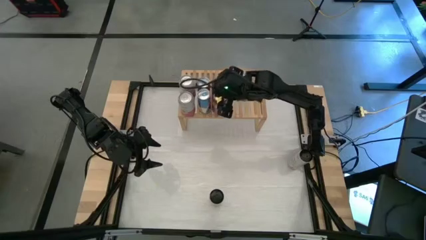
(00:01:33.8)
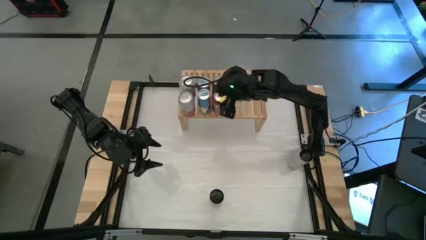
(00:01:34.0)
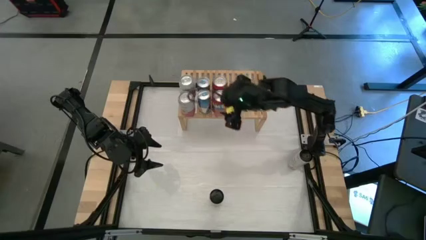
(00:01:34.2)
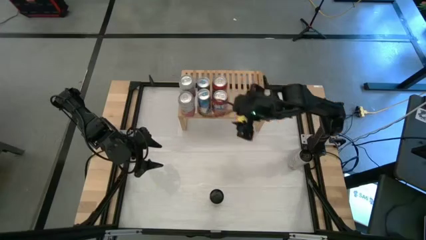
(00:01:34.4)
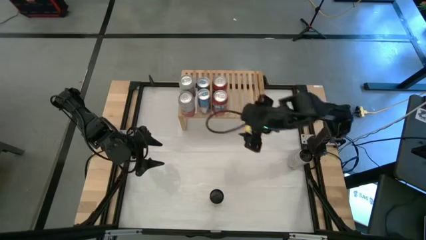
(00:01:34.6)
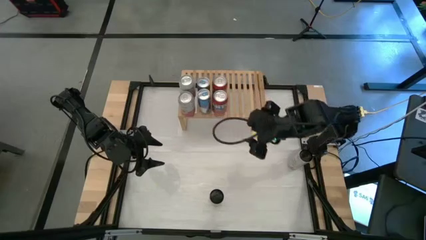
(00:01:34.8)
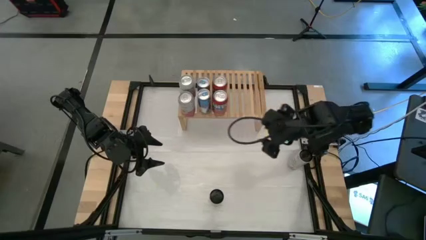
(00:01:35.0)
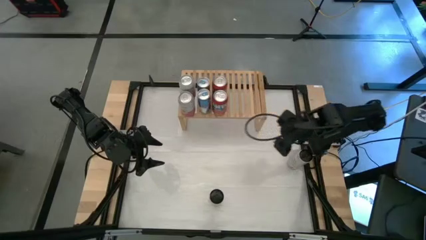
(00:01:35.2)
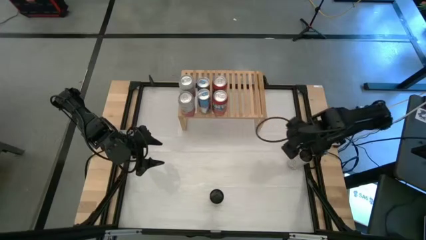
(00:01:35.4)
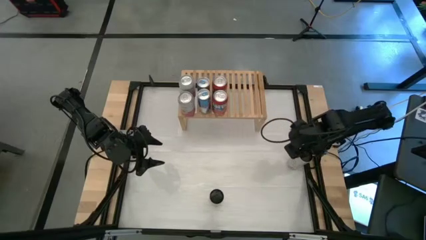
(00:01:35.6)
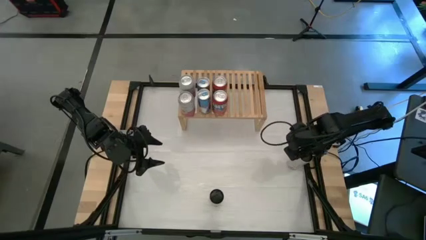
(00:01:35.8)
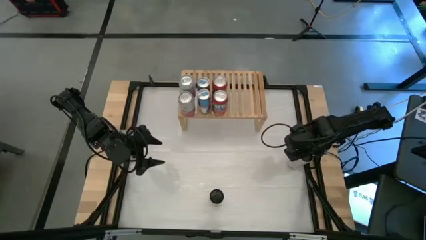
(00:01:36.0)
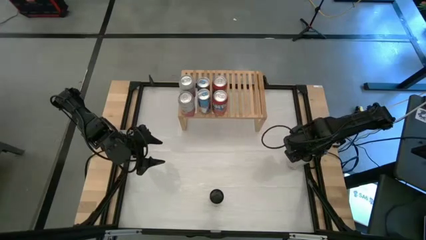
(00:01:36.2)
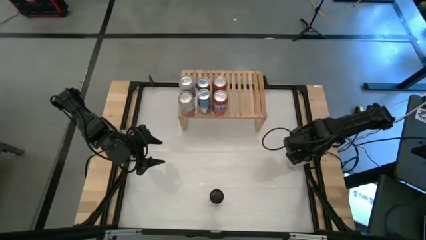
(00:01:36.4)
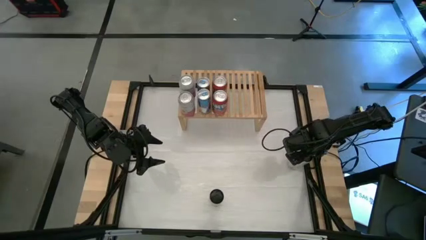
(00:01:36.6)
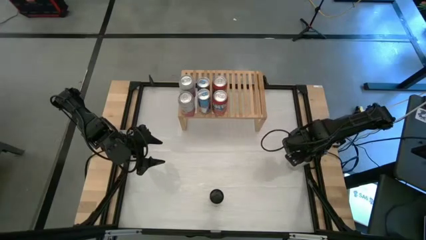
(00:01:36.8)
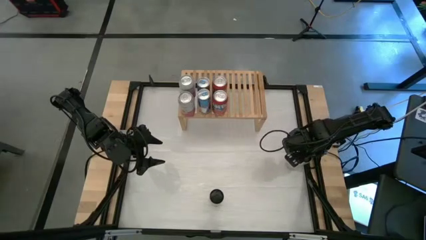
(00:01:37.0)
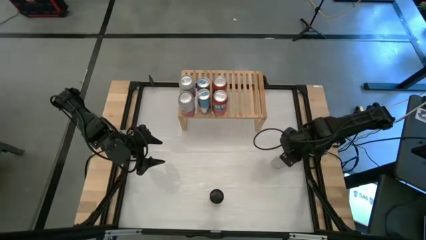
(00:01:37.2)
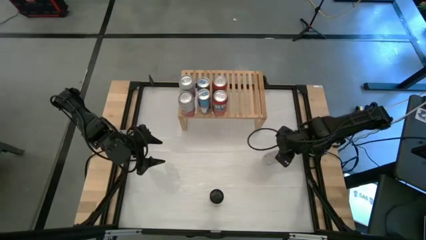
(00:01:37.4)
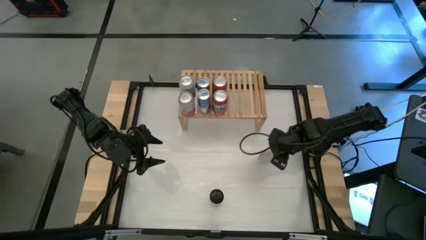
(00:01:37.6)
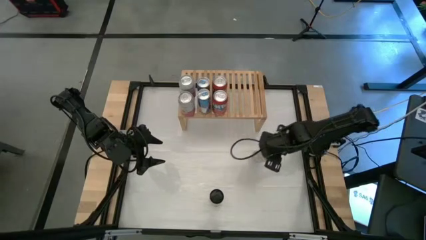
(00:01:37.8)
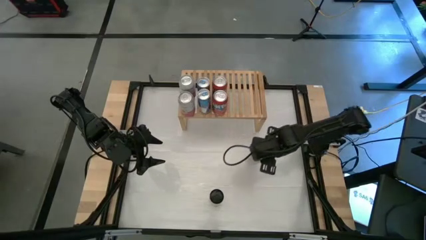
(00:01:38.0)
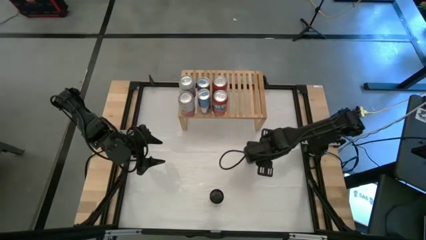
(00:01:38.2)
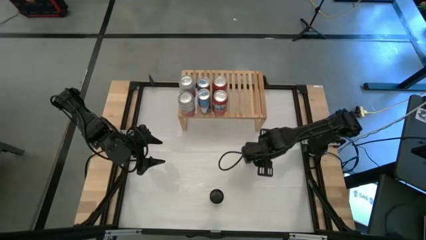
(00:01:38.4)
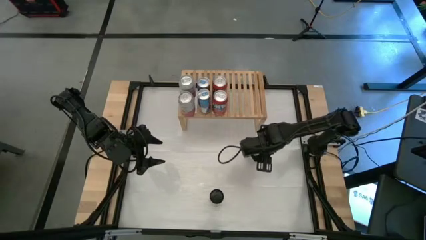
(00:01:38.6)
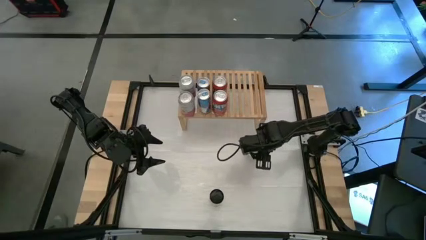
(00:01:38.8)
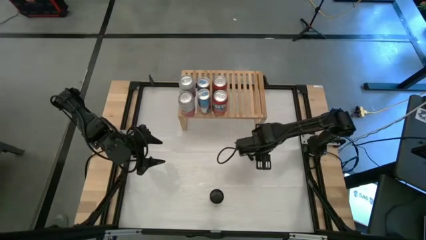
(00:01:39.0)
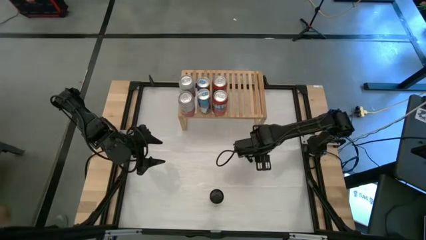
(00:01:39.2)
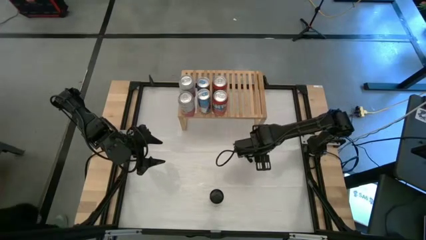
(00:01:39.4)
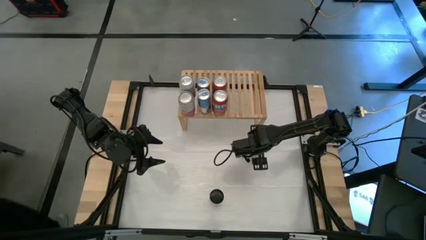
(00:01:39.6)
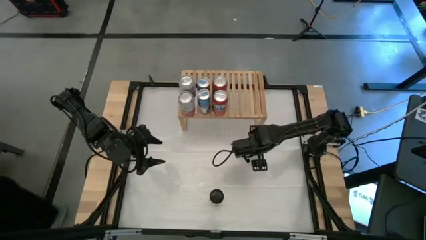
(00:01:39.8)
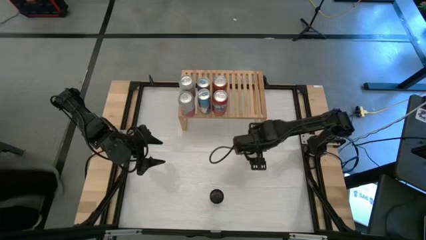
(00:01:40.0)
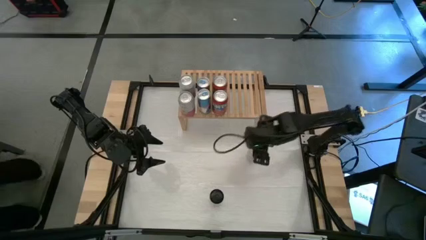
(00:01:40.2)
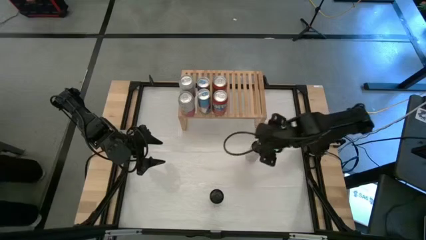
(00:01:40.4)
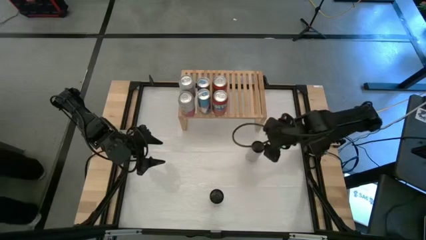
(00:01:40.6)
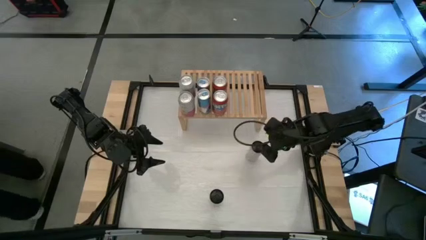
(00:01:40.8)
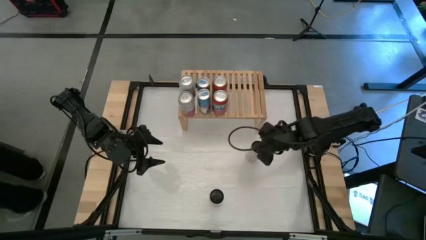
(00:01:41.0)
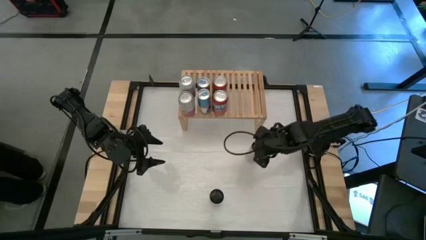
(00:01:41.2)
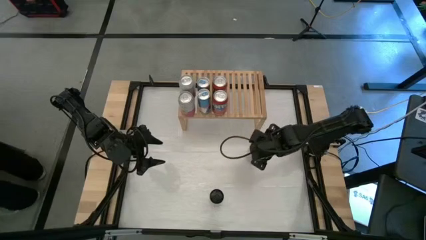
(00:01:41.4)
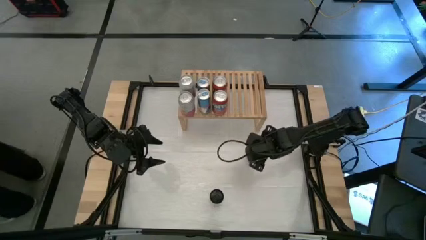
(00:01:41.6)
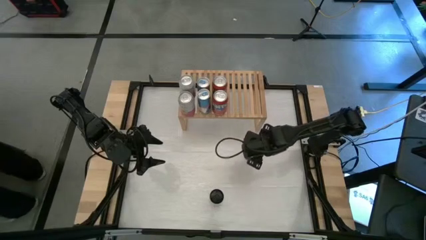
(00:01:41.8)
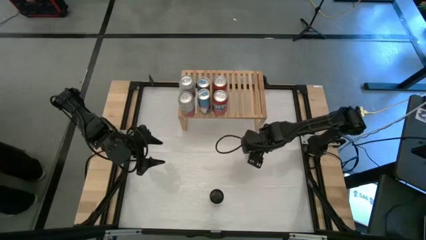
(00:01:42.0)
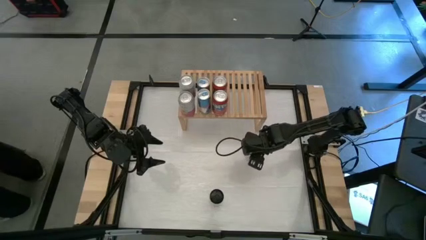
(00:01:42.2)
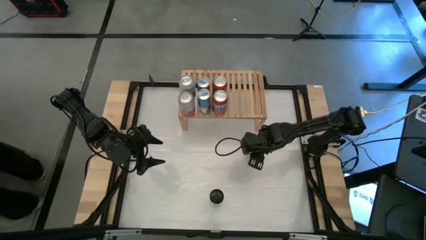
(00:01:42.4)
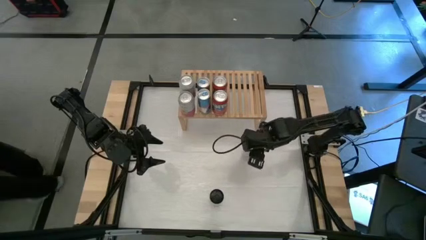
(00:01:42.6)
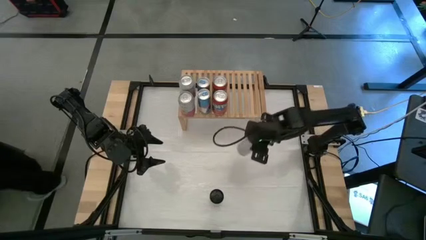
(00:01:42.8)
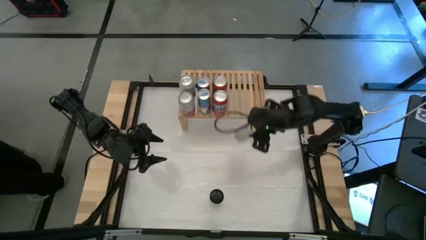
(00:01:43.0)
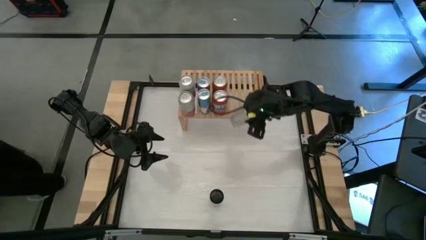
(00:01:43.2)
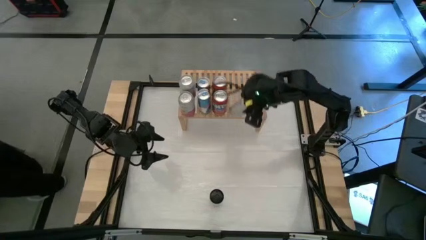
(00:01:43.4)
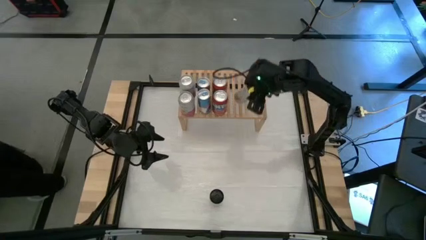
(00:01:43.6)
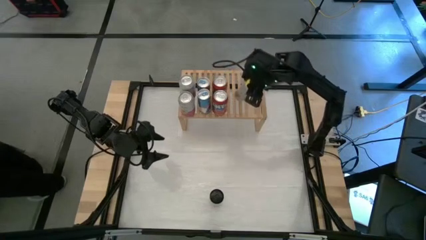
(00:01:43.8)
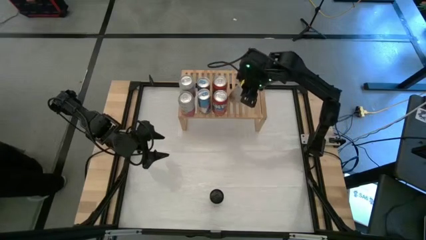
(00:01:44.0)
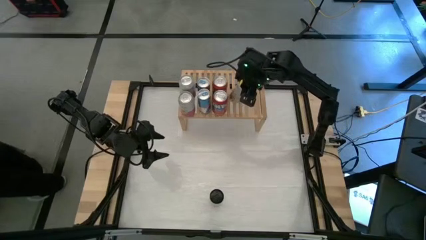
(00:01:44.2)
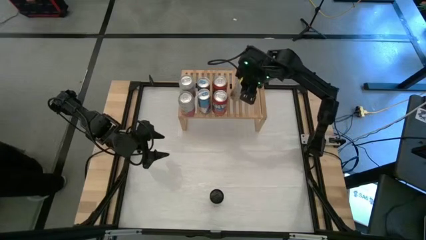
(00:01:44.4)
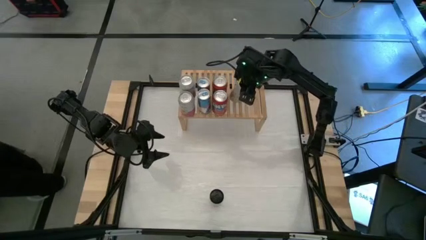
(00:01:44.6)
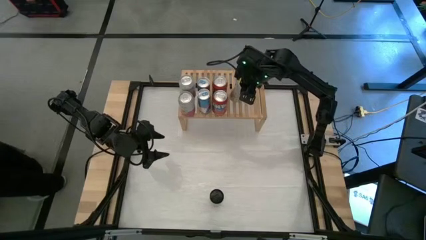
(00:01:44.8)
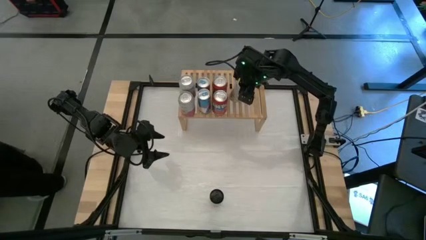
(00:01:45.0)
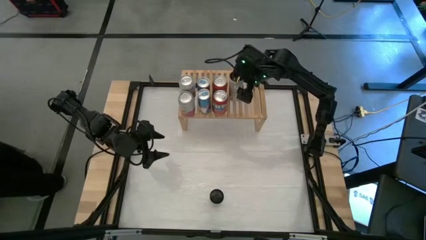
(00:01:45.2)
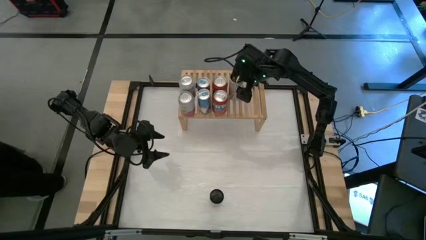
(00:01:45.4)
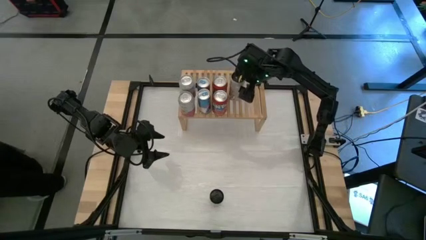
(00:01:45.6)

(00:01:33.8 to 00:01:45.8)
Task: Place canned beverage on shelf
Put the top white yellow soda can on the shelf
